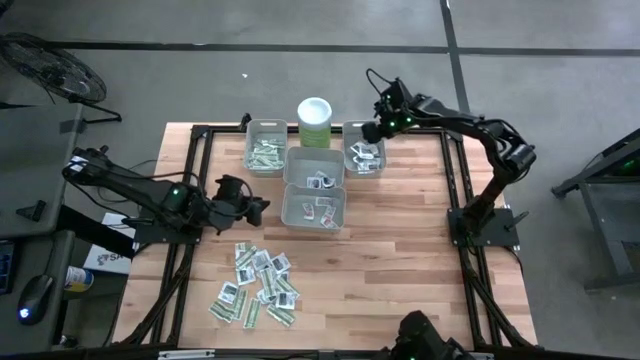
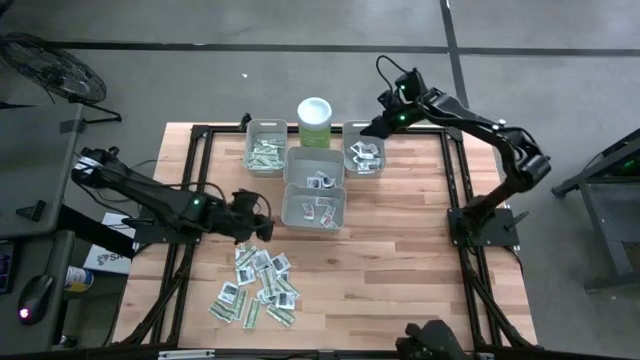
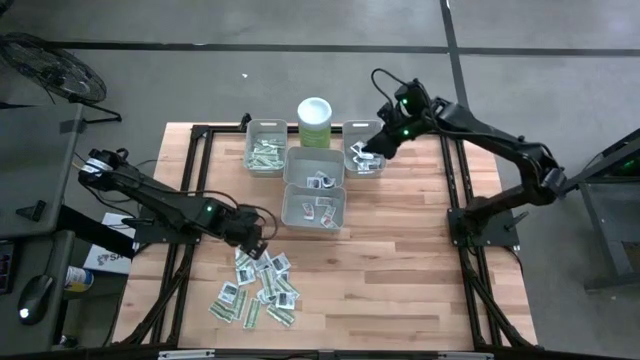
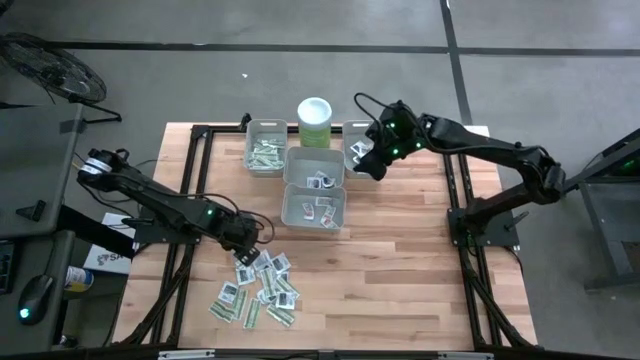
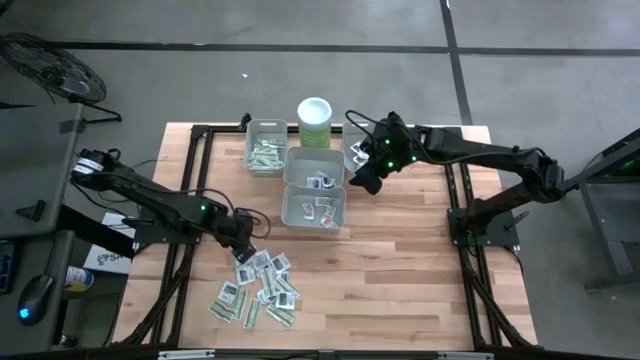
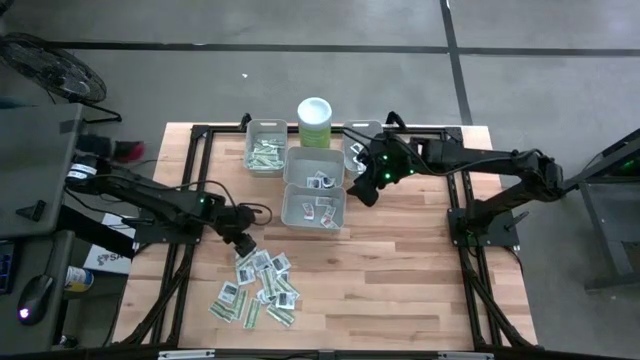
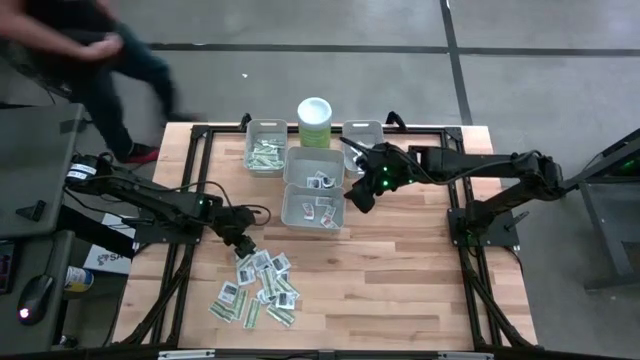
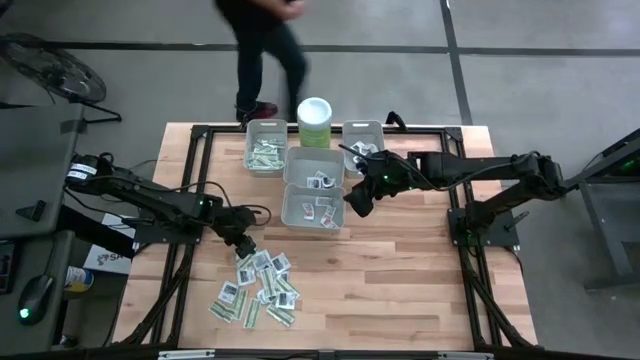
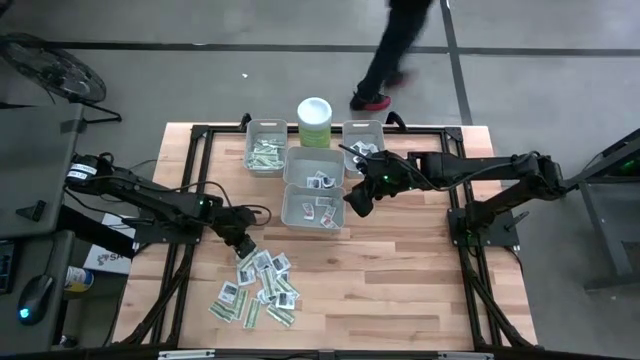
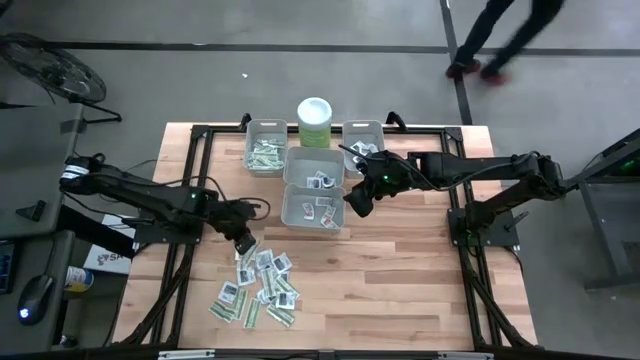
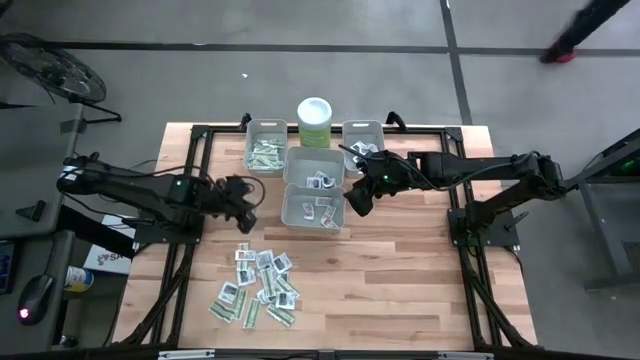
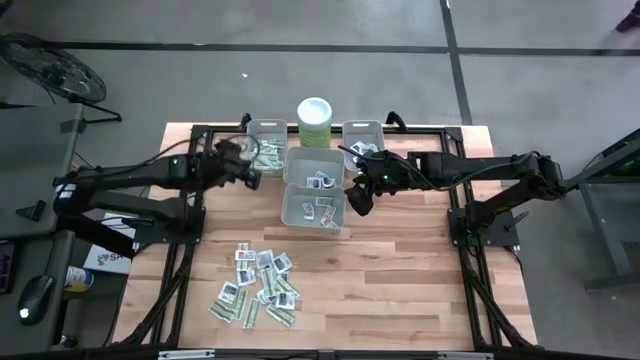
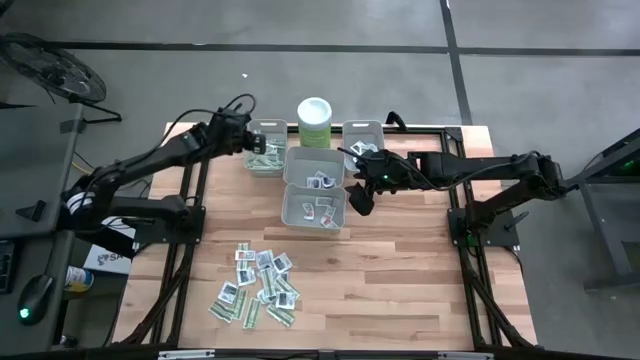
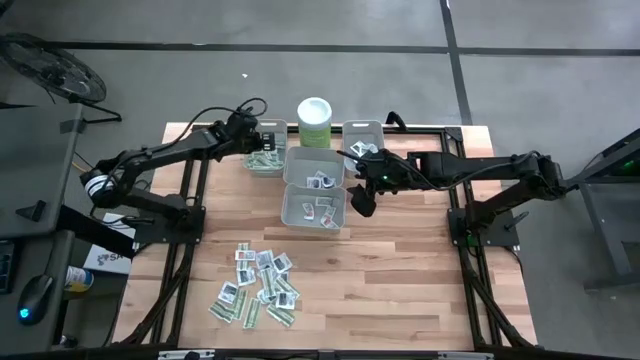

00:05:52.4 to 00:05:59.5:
Task: Pick & Place First Aid Supplies
Put the bandage pack into the left bin

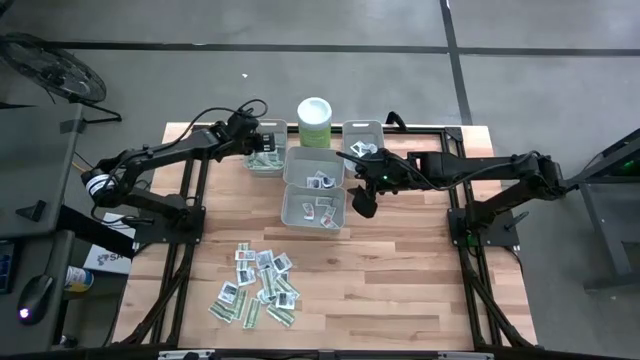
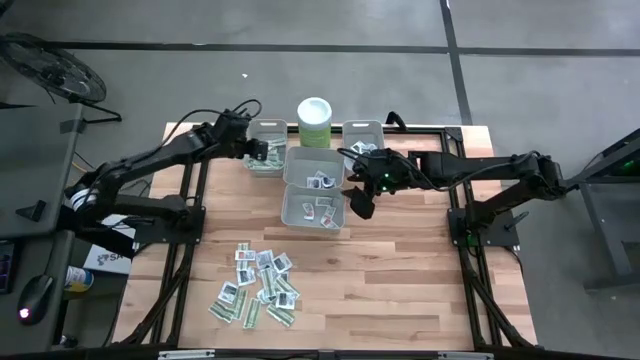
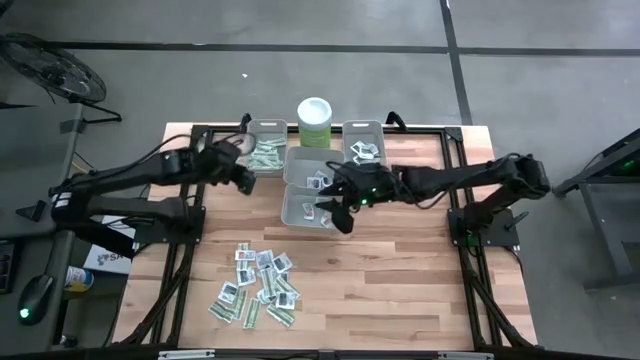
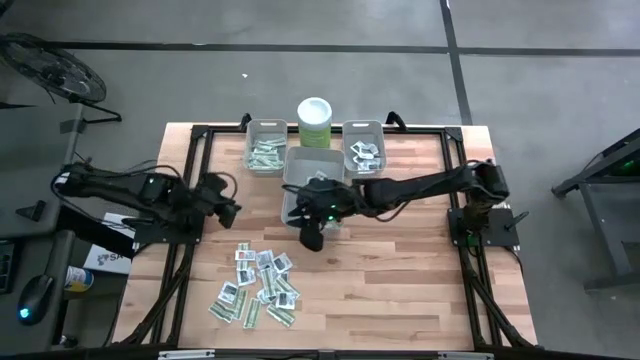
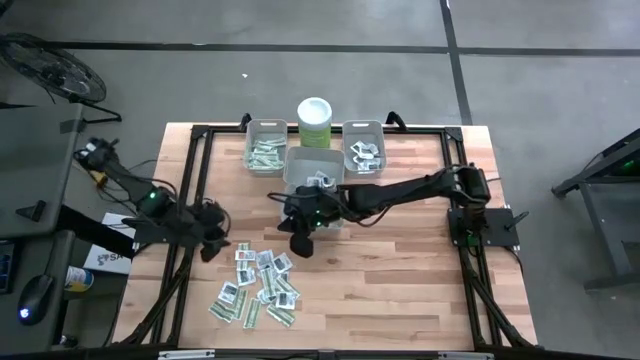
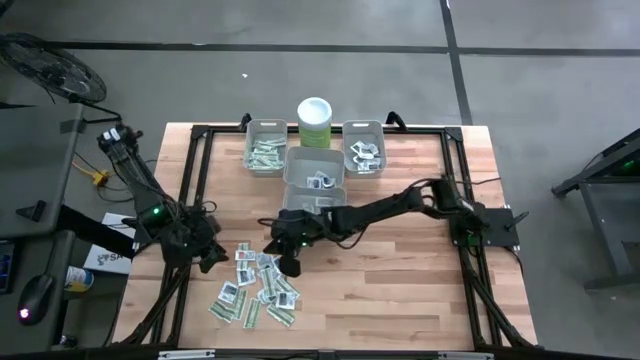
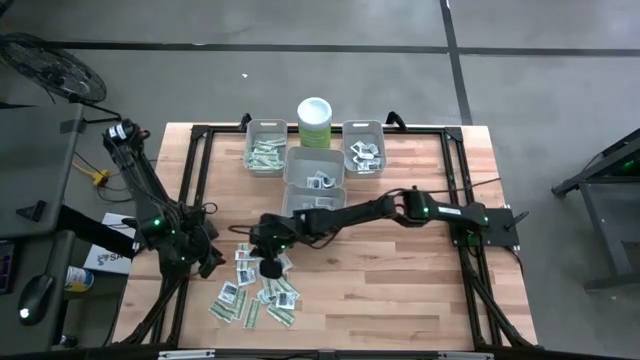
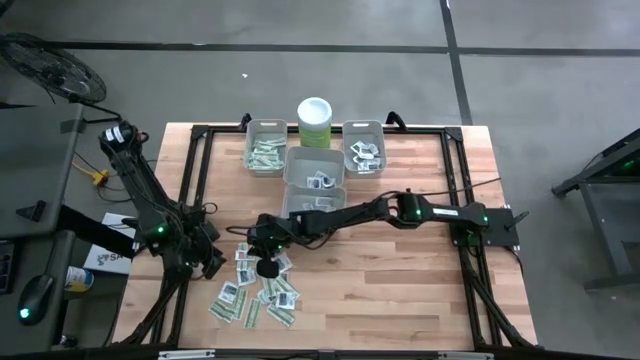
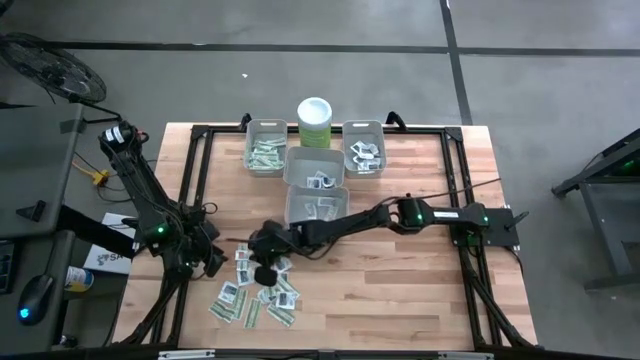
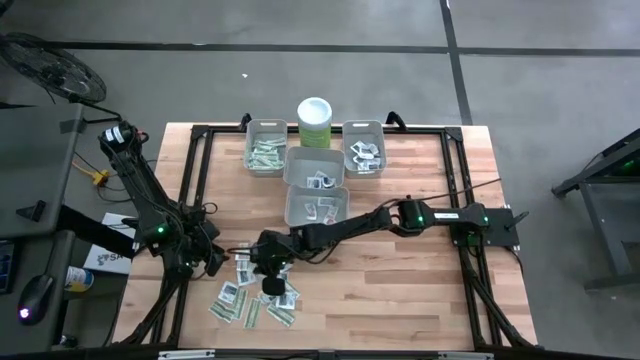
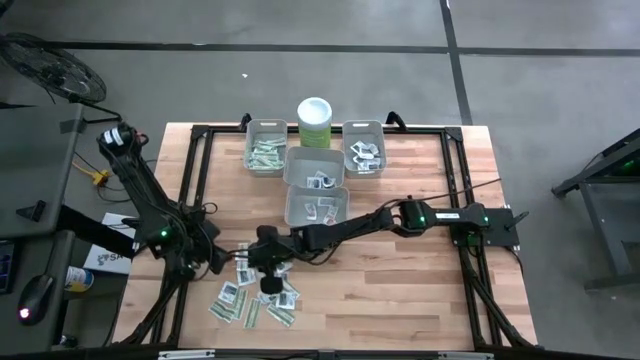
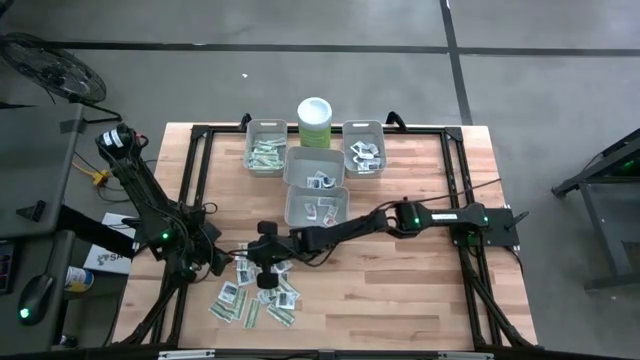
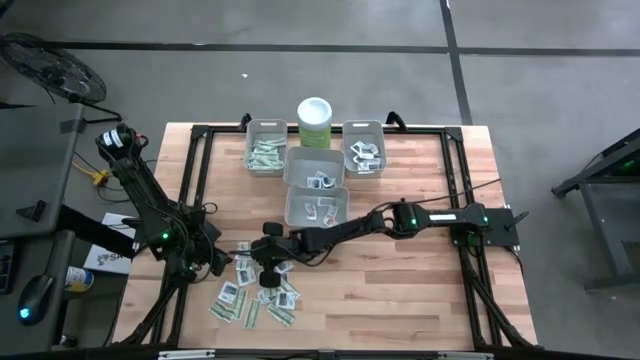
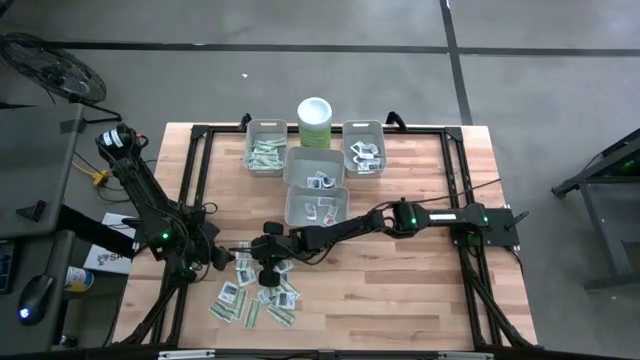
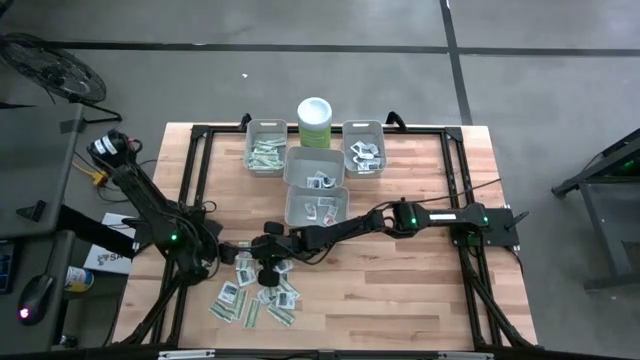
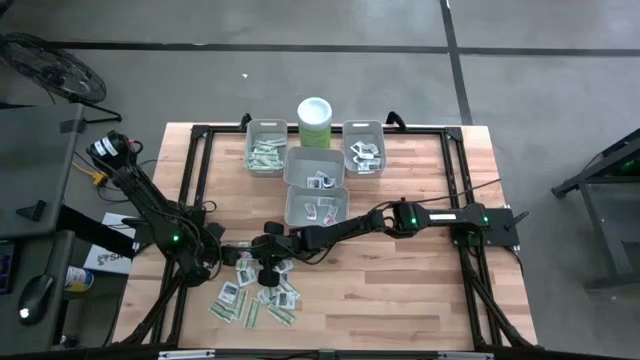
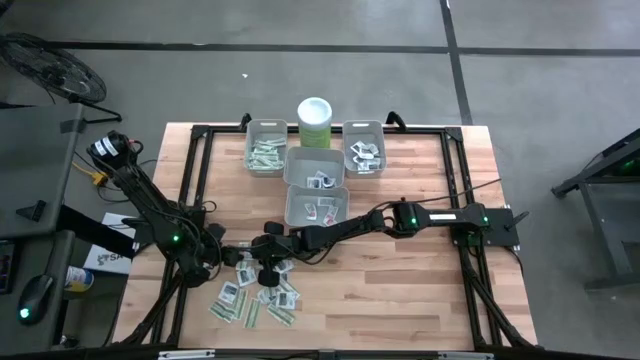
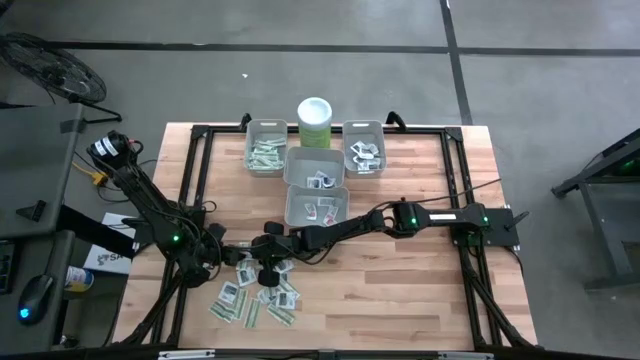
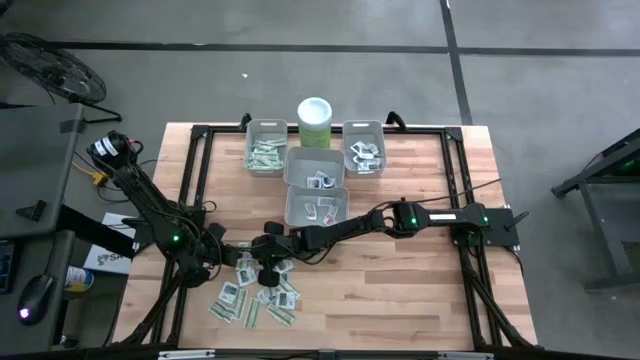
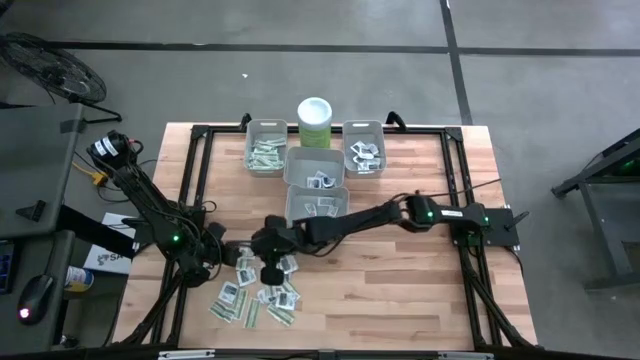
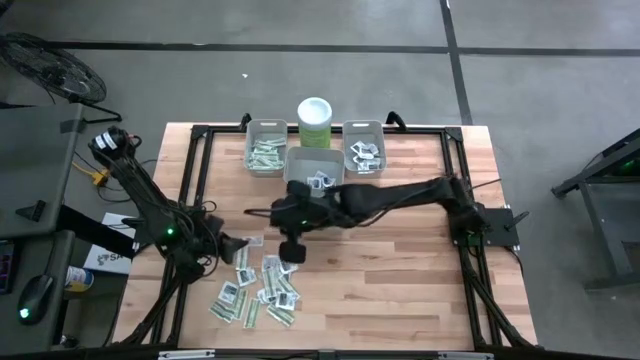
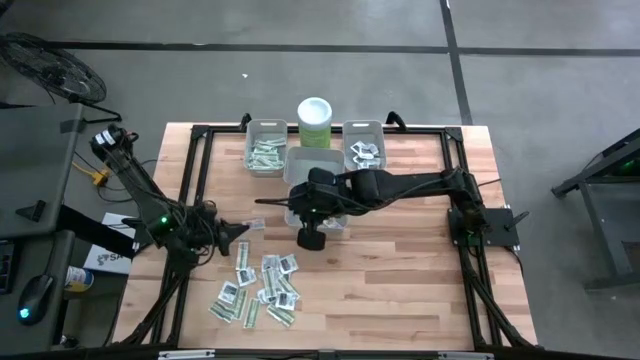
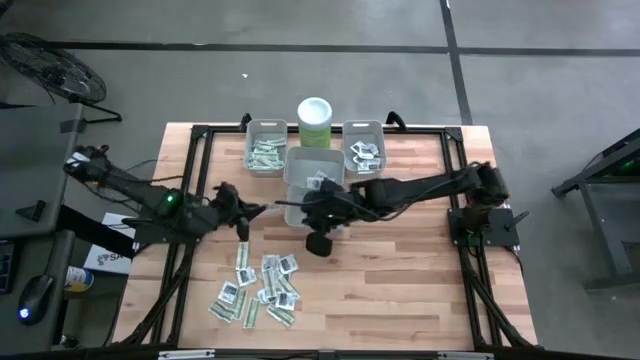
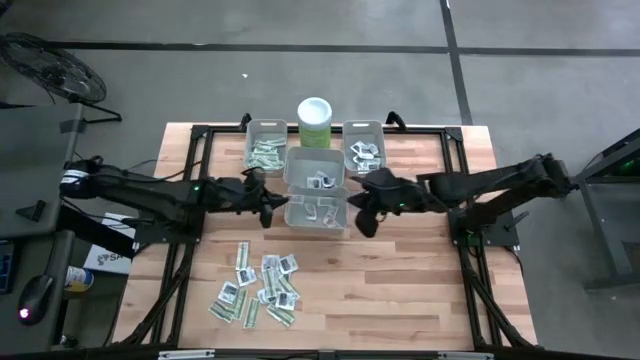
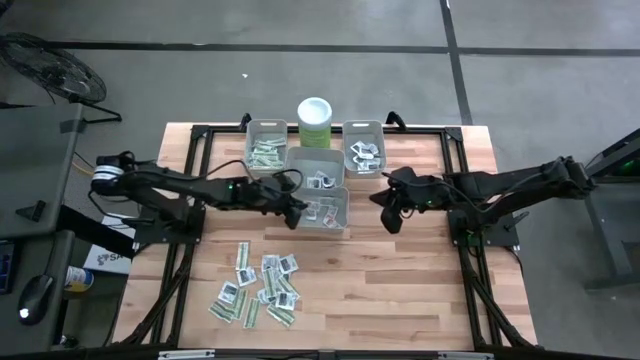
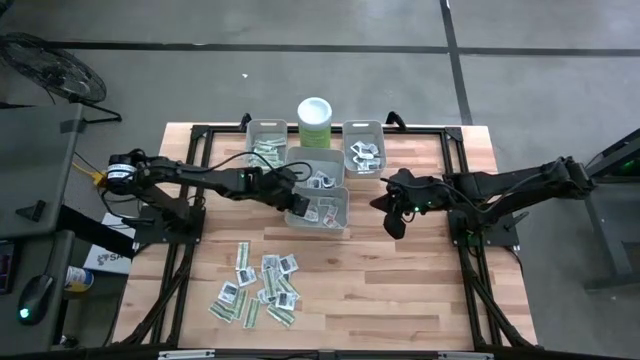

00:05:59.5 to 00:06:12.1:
Put the ointment pack into the bottom center bin

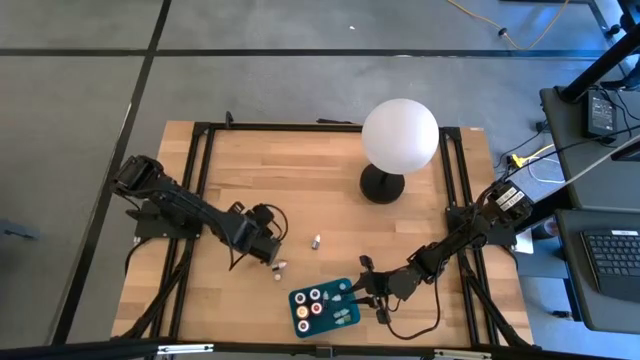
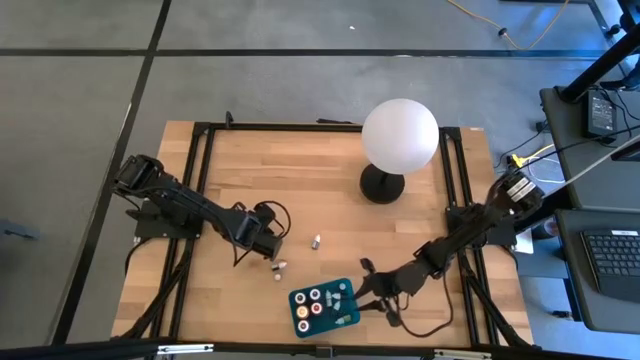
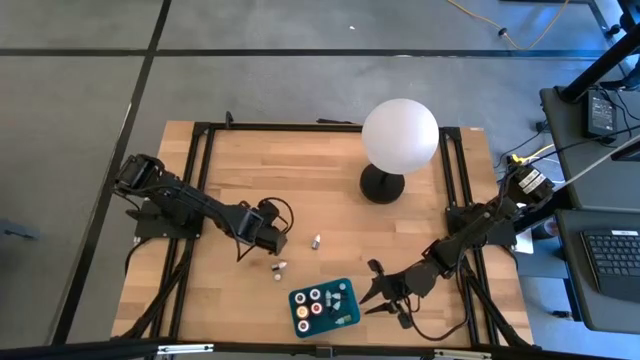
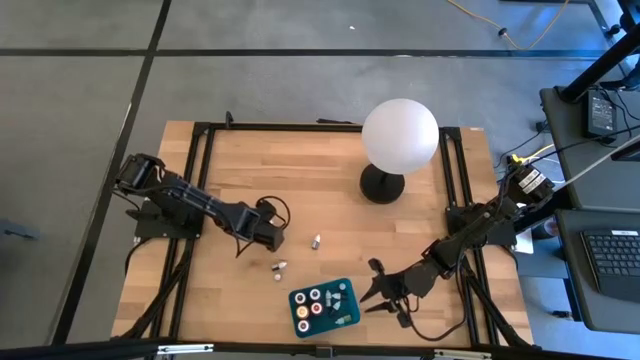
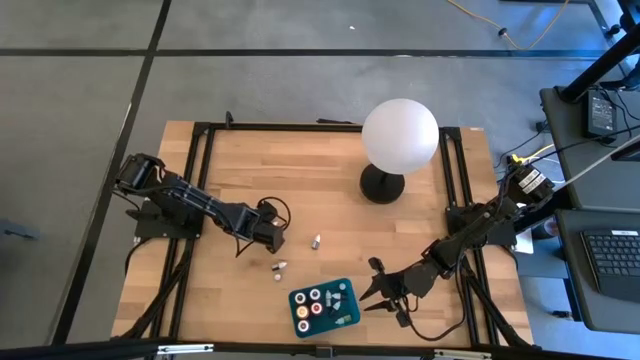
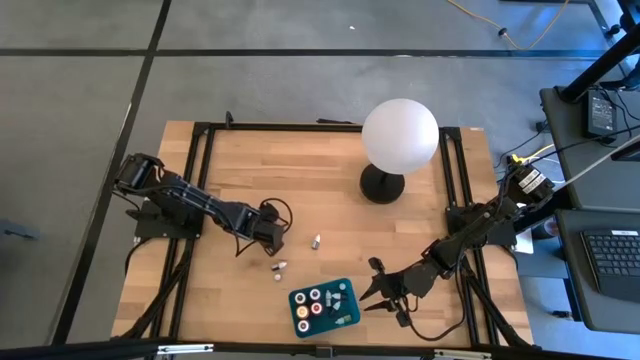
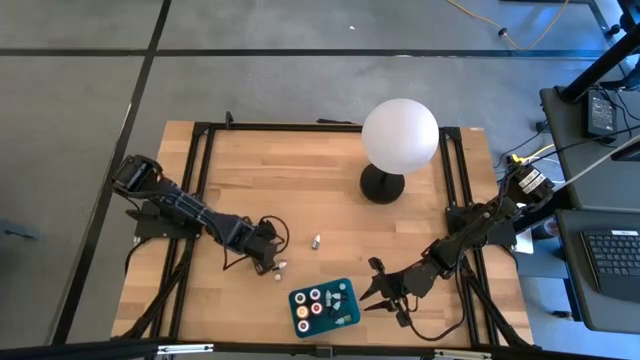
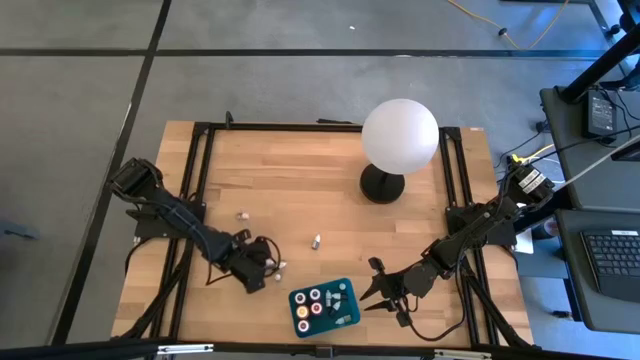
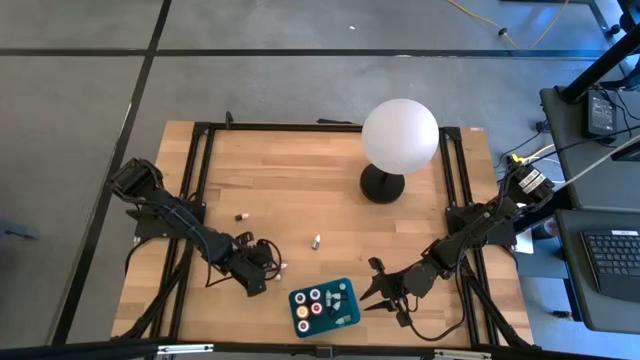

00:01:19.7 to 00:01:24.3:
Task: Pick & Place food coloring
Put the small green food coloring bottle into the blue bin
